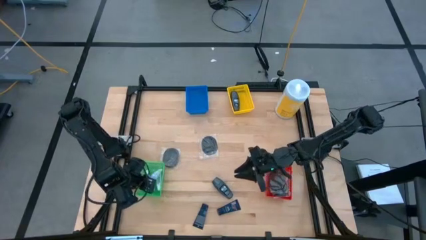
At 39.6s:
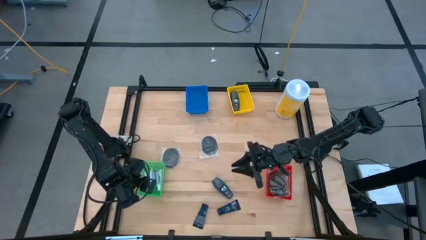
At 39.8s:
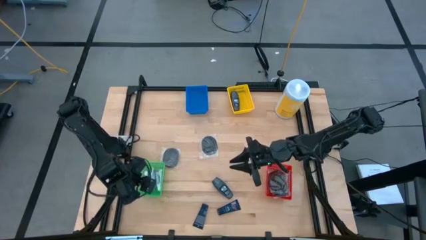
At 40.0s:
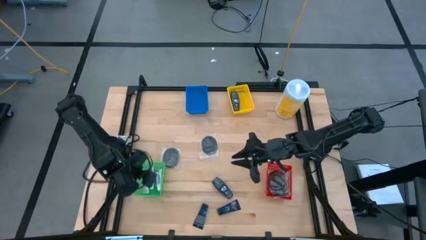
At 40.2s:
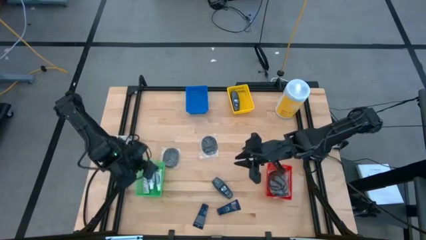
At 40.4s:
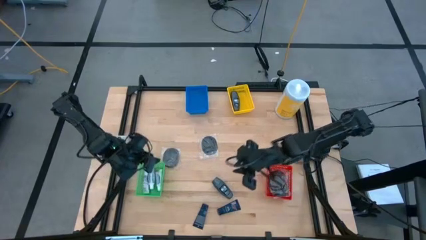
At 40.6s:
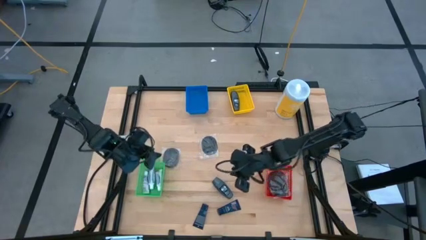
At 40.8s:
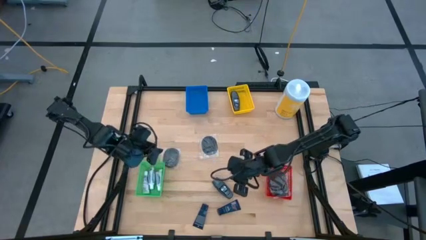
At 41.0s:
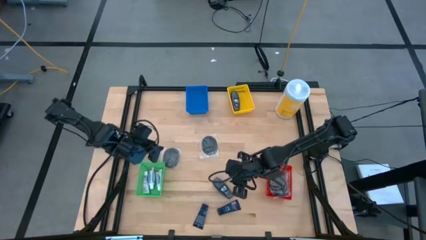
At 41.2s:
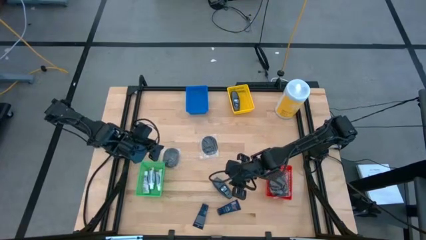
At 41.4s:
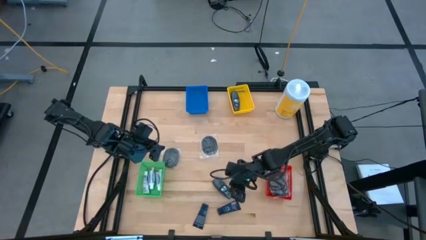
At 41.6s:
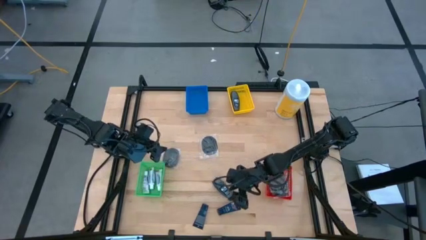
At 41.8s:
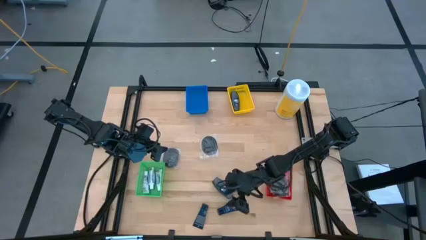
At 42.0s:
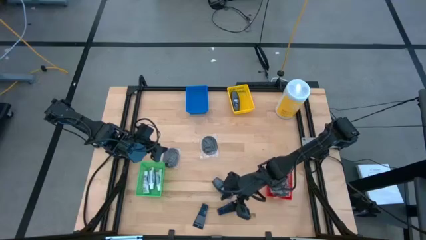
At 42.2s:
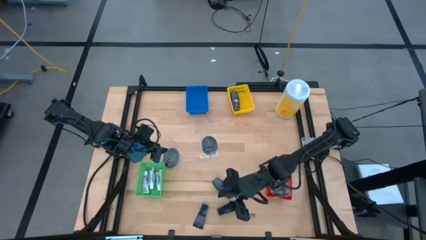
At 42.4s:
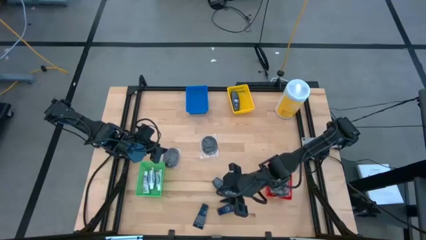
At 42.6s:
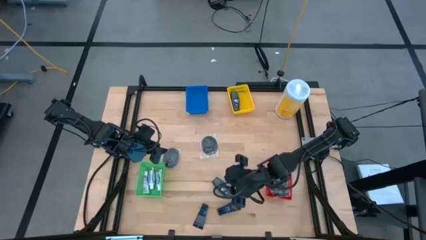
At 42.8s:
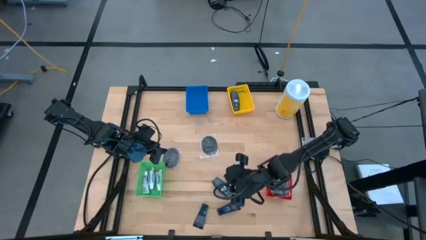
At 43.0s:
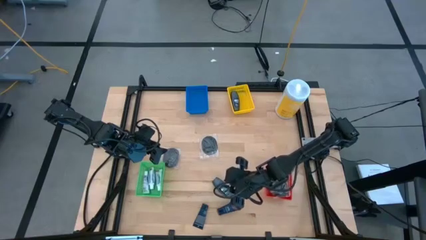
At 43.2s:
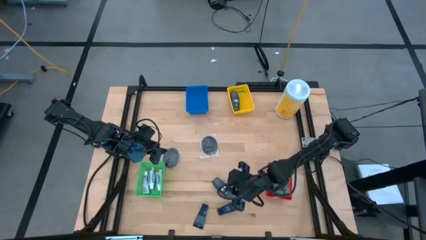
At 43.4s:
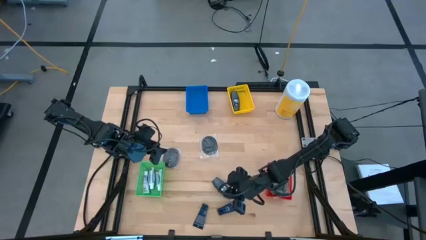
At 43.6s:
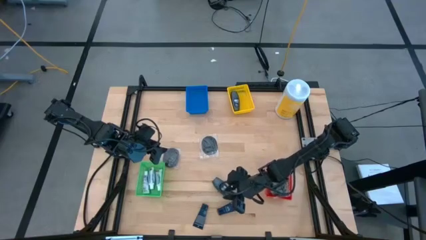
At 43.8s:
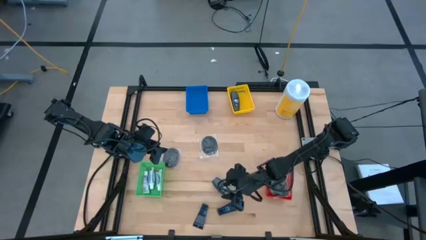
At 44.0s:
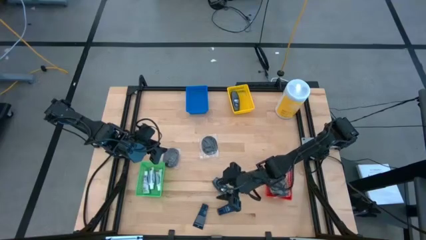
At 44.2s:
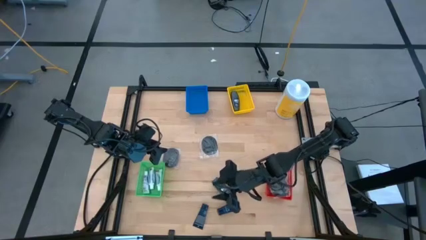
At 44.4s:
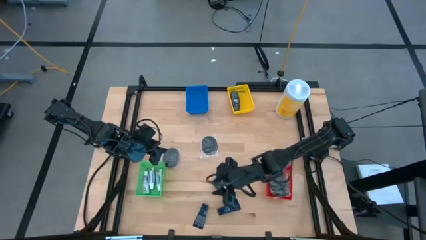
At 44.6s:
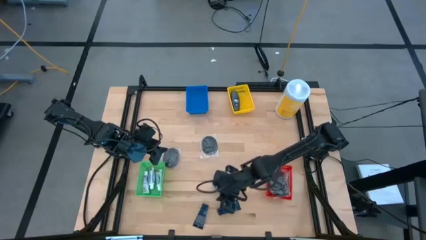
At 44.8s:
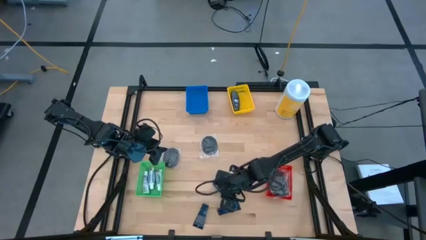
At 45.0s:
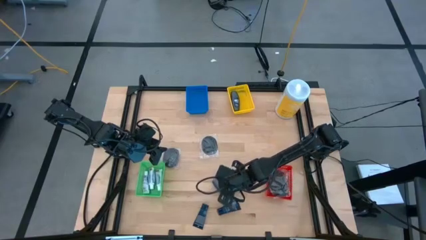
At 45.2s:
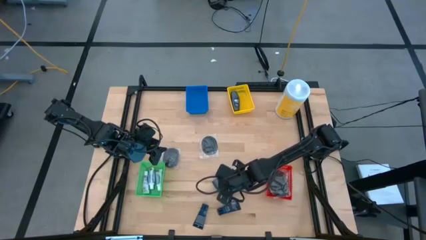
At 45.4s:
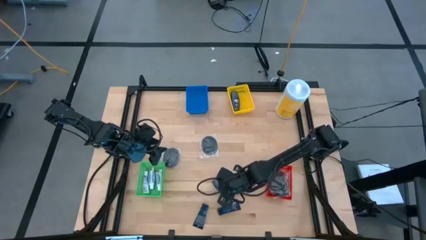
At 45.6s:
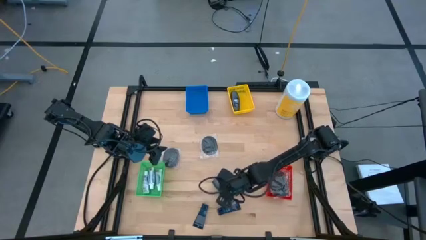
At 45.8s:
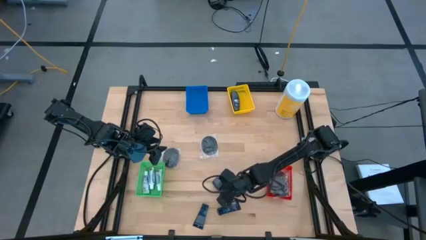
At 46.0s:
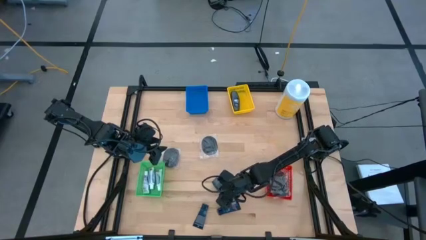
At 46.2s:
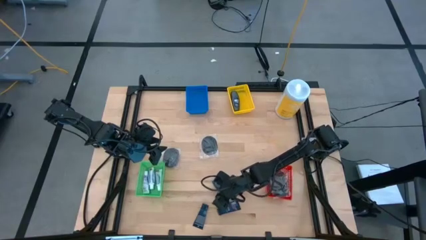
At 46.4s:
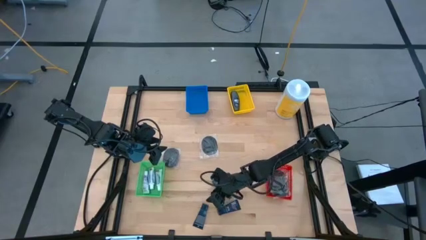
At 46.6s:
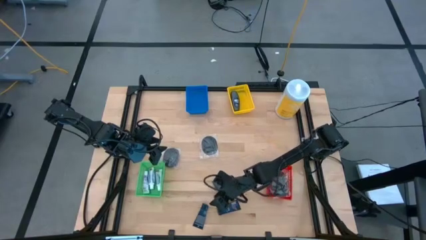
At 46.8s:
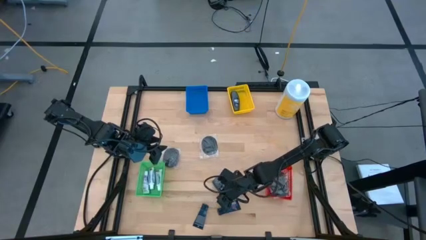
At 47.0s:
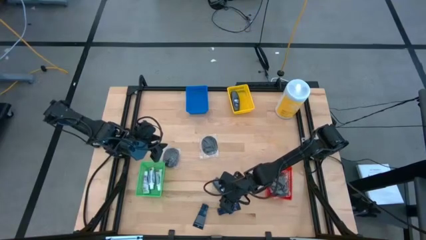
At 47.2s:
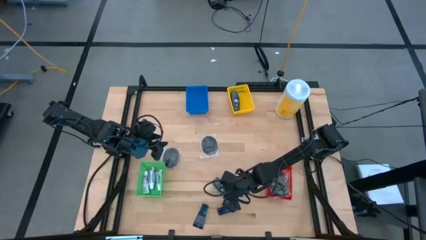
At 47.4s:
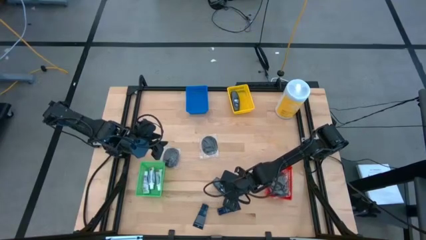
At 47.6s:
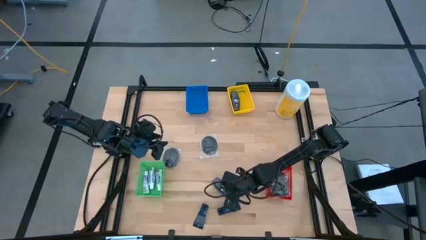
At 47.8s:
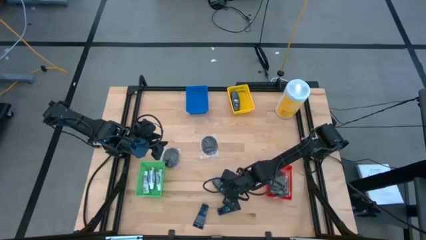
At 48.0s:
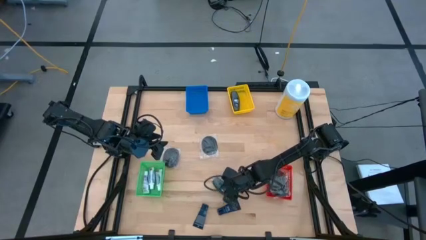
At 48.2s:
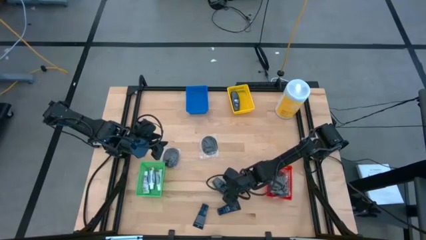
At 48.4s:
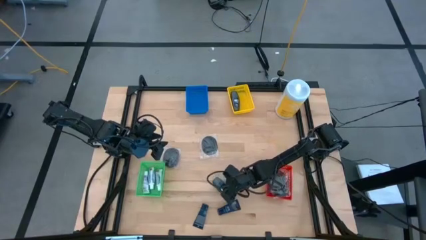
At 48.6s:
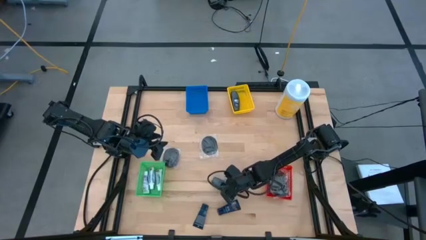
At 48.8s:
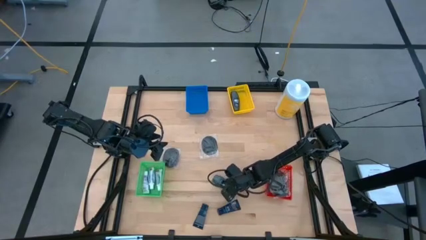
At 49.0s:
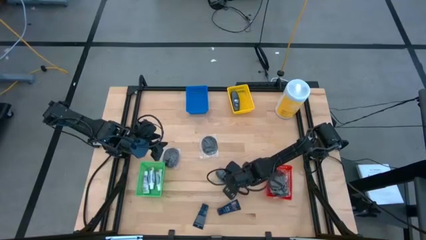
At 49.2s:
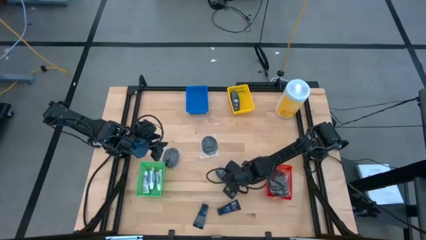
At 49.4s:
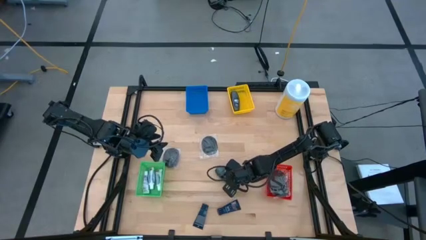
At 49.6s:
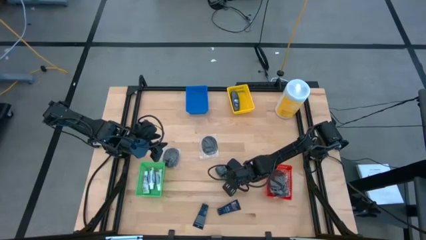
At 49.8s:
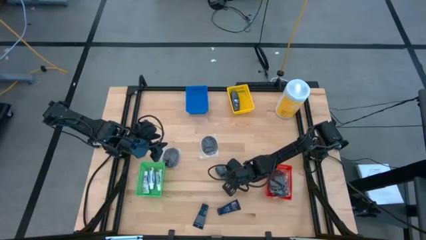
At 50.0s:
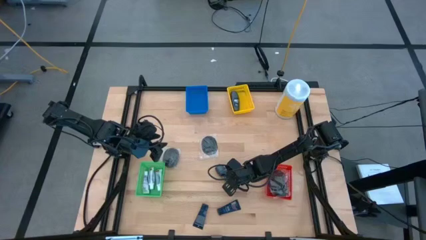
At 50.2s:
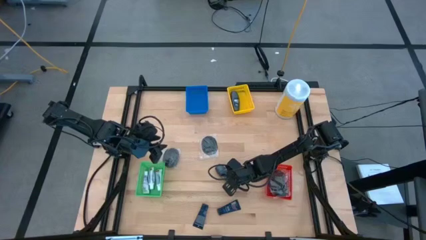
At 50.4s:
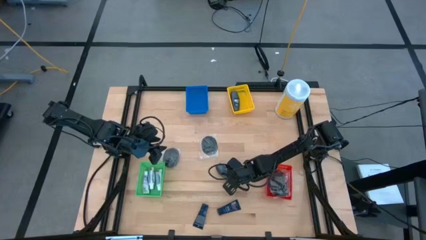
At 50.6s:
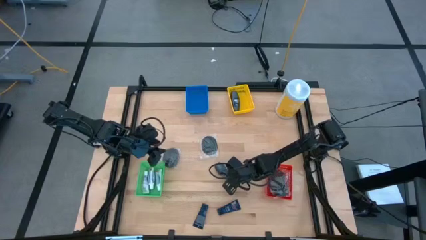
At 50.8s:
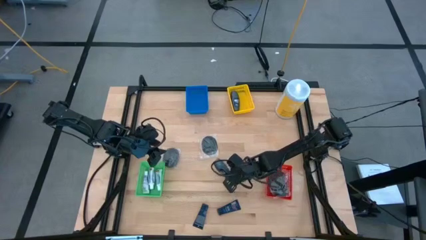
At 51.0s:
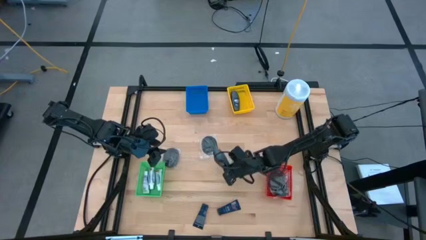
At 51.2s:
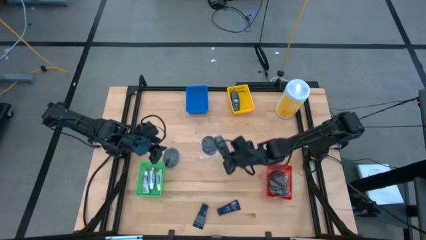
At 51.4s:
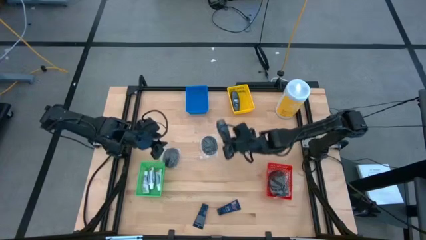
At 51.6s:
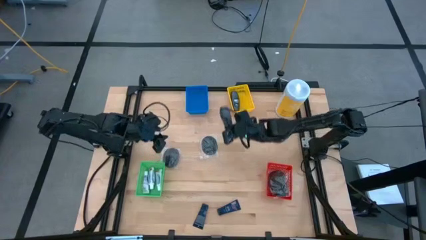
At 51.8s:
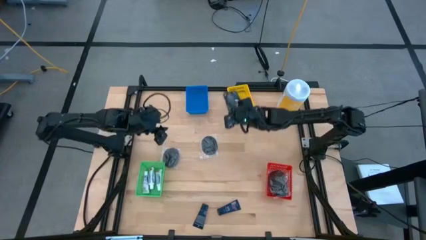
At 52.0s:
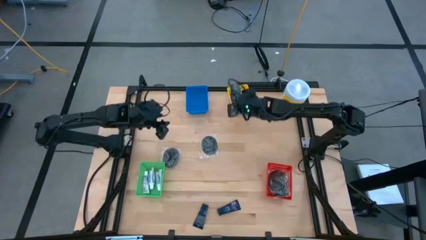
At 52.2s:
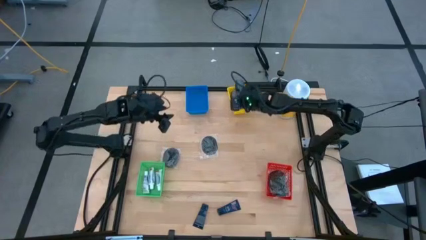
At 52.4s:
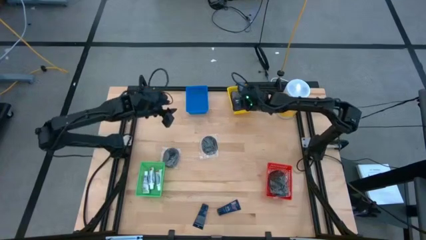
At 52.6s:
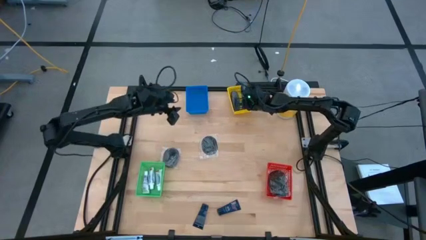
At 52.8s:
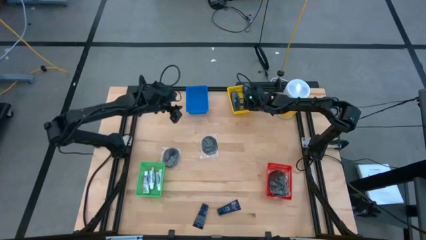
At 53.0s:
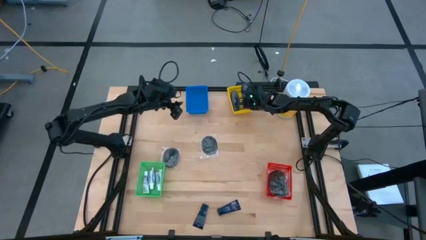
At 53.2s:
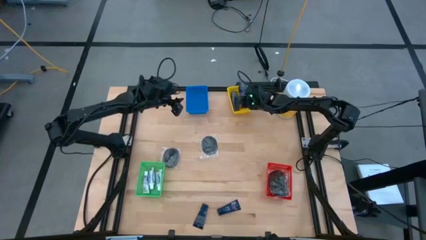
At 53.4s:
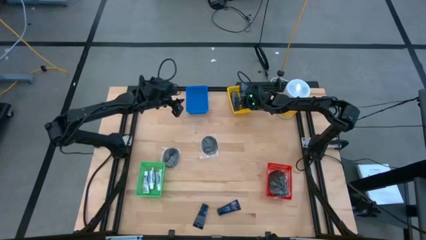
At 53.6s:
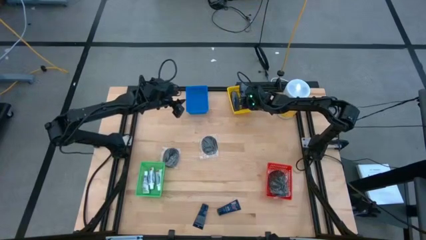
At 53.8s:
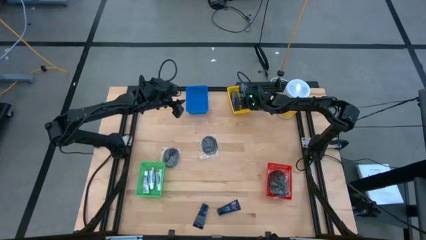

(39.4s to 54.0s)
Task: Pick & Place Travel size toiletries
Put the black deodorant into the yellow bin

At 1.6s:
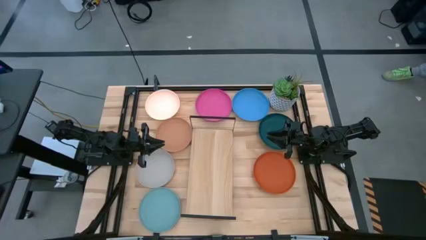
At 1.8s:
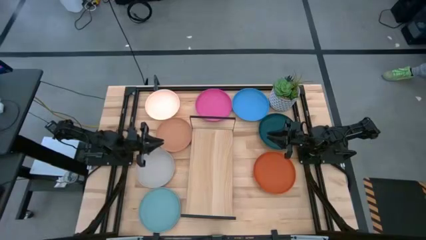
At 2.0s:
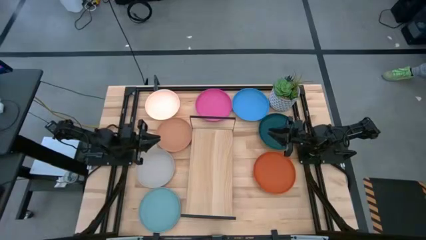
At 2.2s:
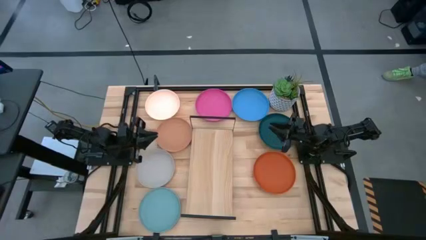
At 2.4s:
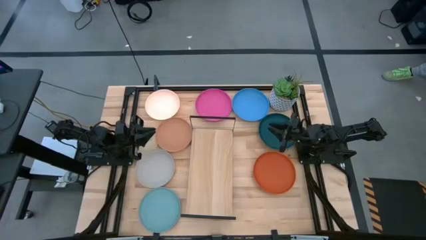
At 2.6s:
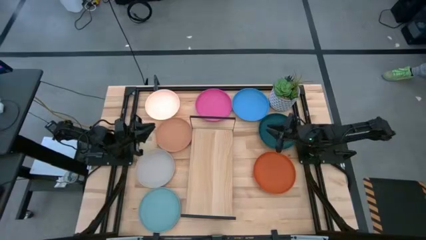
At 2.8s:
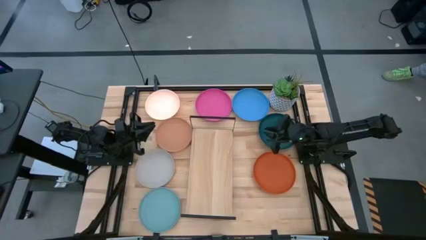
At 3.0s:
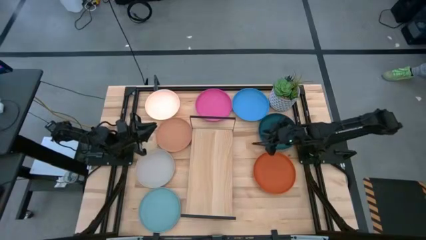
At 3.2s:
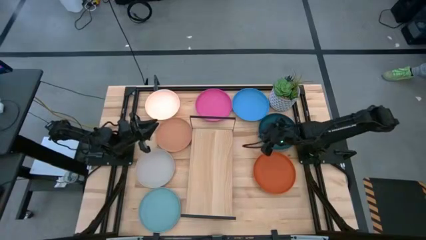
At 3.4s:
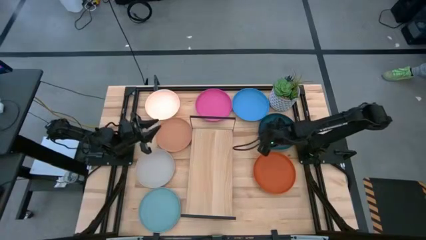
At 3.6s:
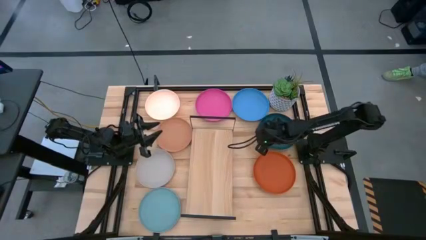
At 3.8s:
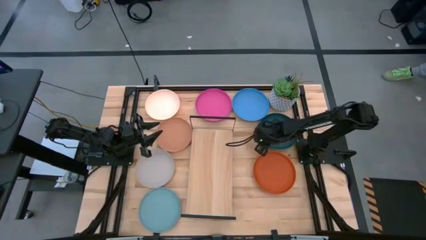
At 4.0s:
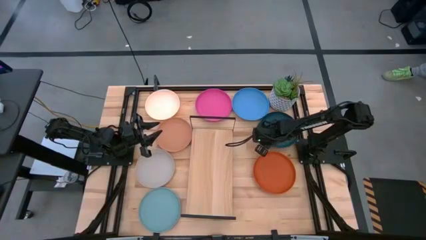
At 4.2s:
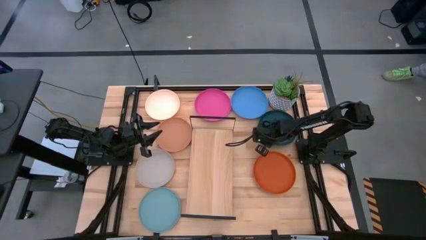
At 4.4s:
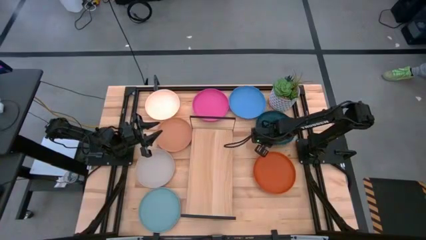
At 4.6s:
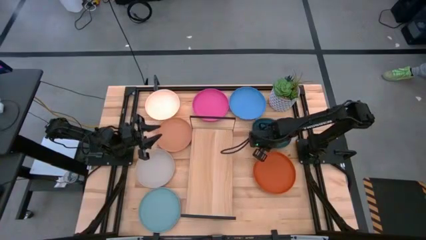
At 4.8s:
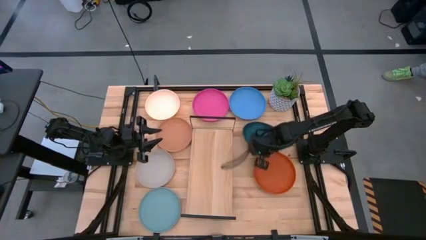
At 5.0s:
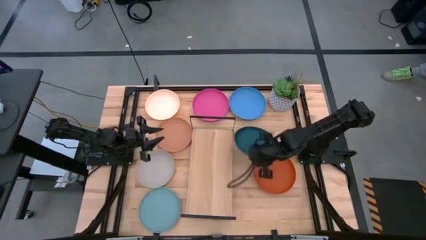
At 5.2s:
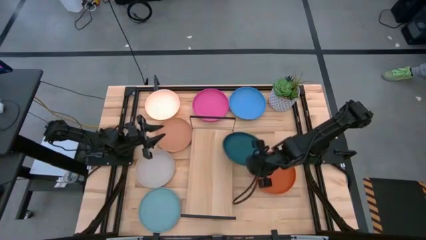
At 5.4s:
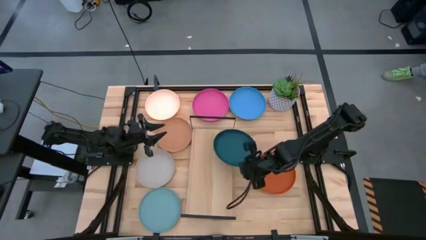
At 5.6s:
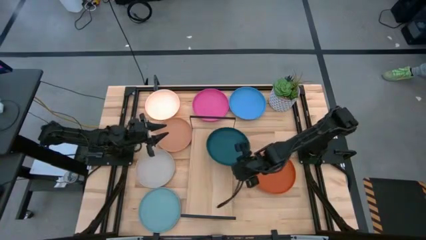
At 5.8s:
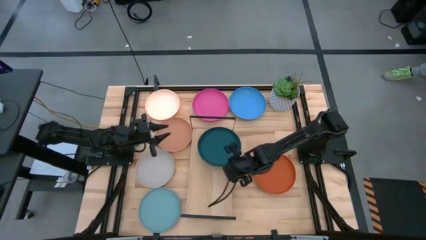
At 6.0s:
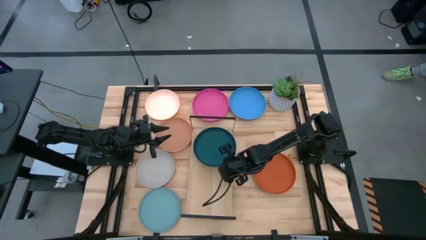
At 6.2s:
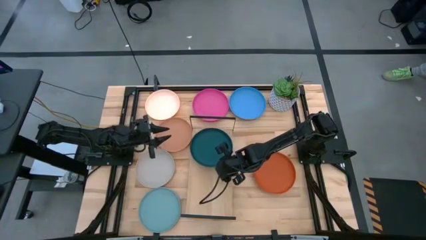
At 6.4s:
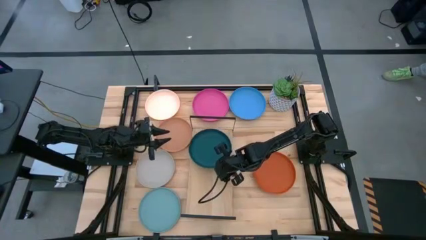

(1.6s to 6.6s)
Task: Place and stack plates onto a shelf
Put the dark green plate on the shelf
